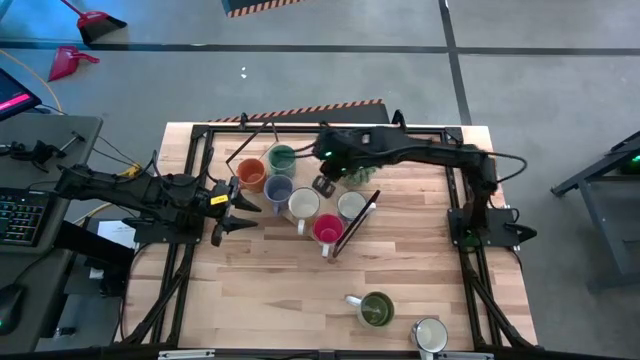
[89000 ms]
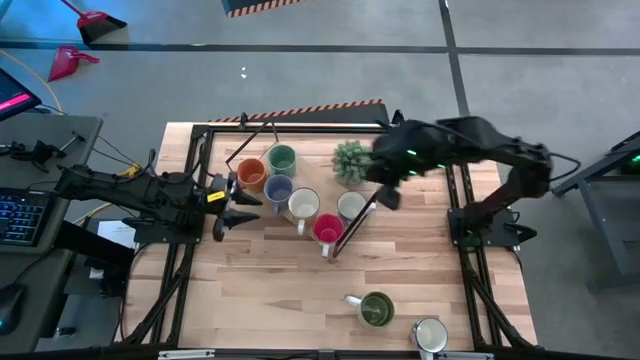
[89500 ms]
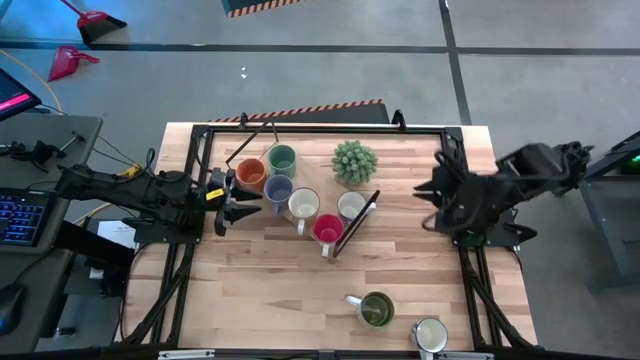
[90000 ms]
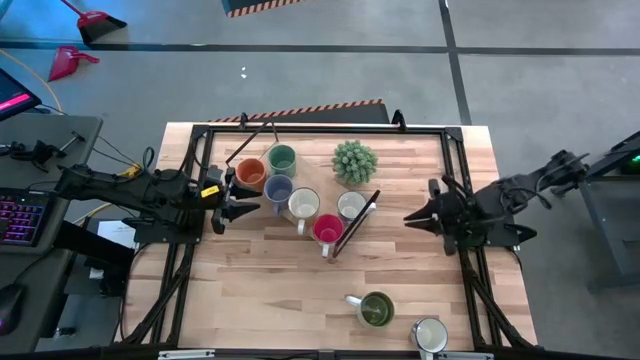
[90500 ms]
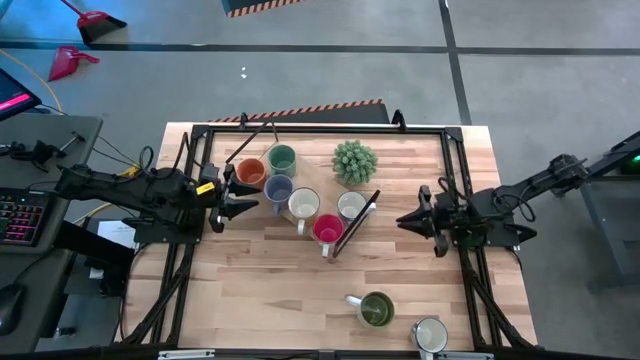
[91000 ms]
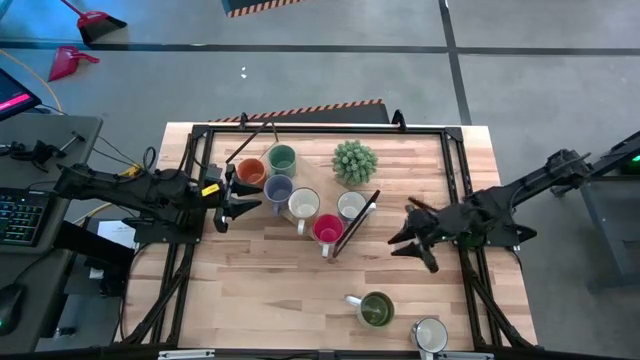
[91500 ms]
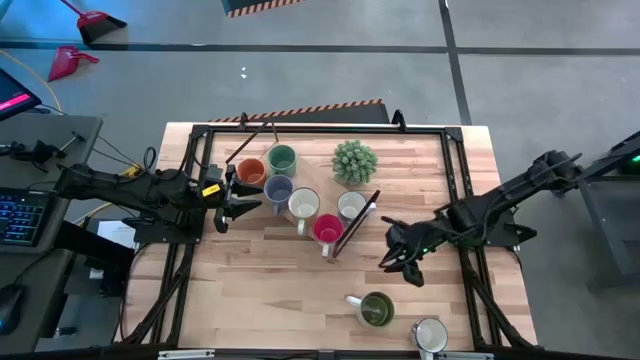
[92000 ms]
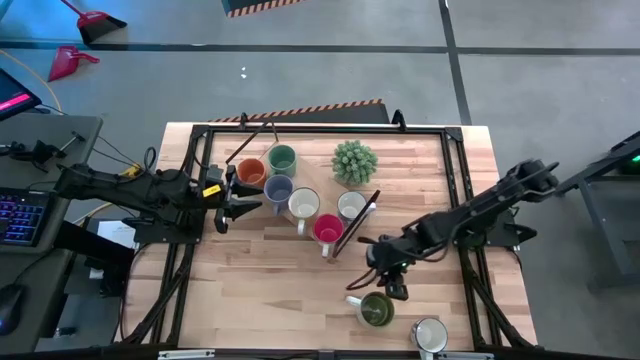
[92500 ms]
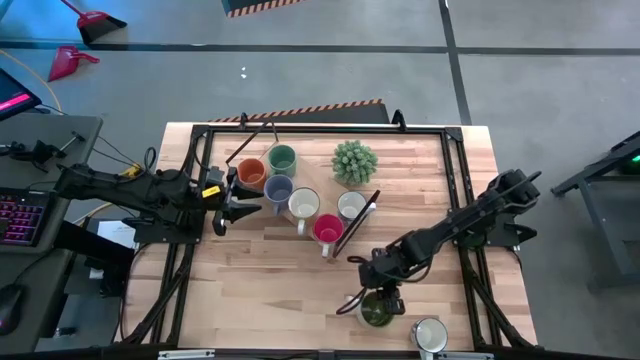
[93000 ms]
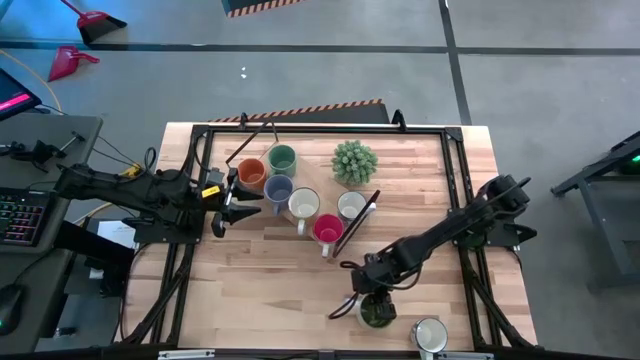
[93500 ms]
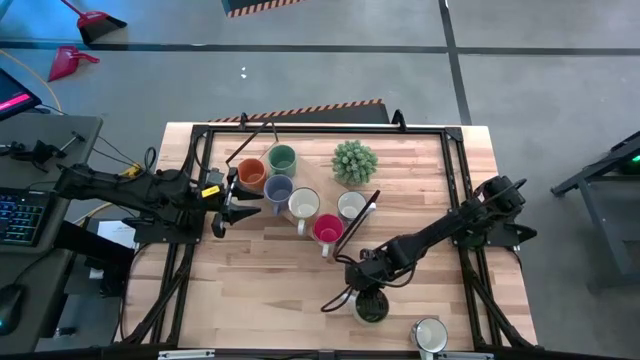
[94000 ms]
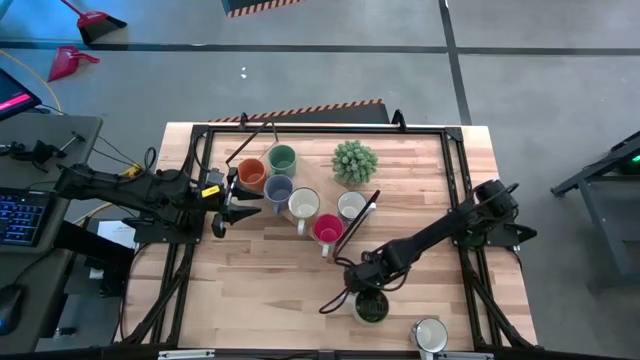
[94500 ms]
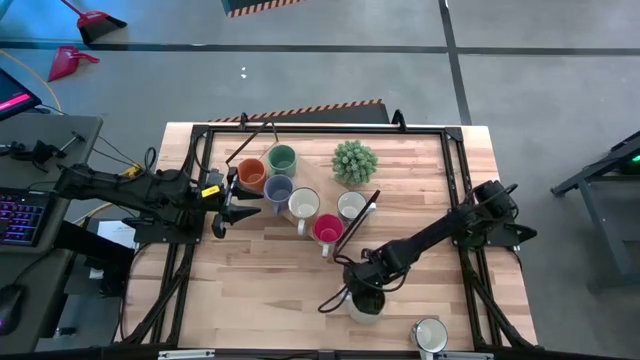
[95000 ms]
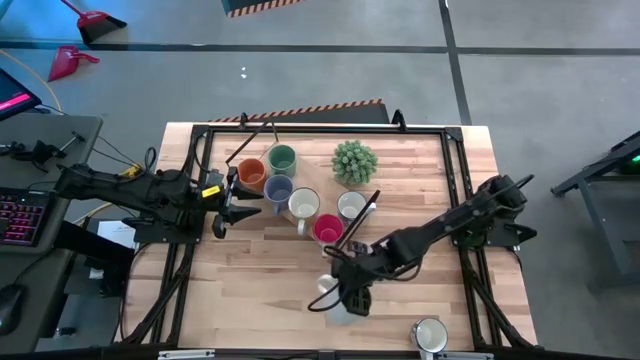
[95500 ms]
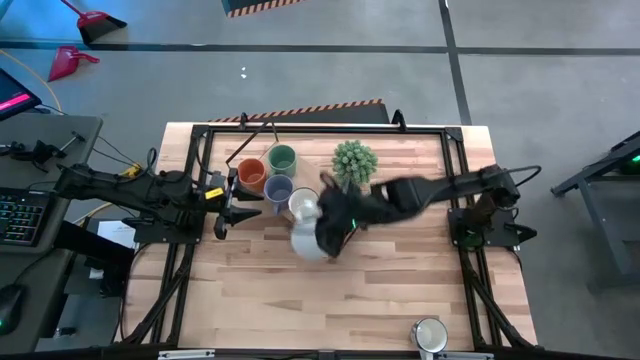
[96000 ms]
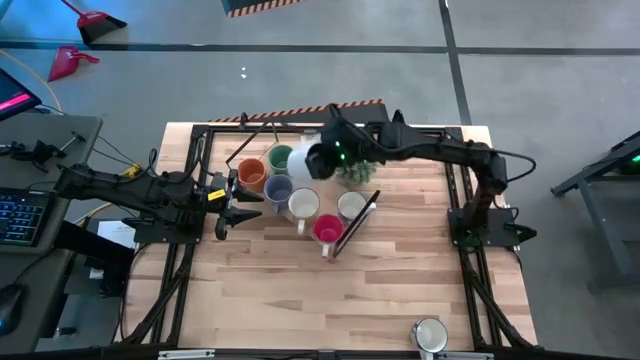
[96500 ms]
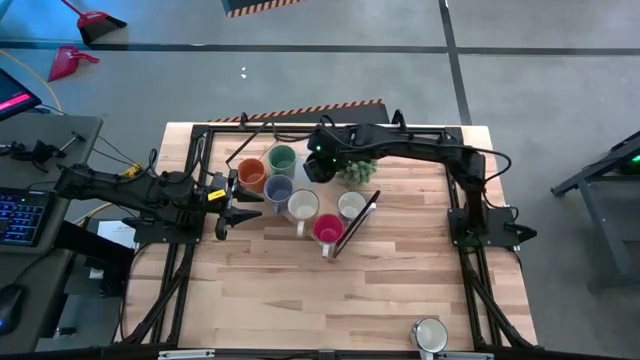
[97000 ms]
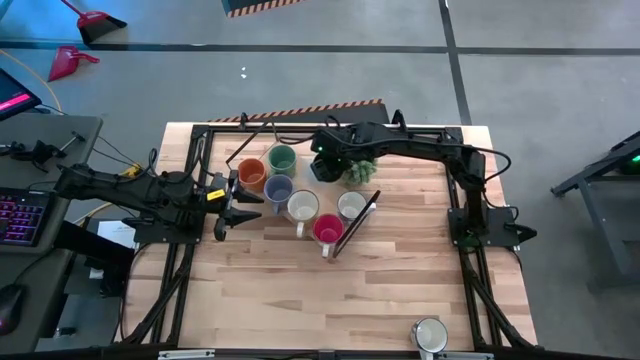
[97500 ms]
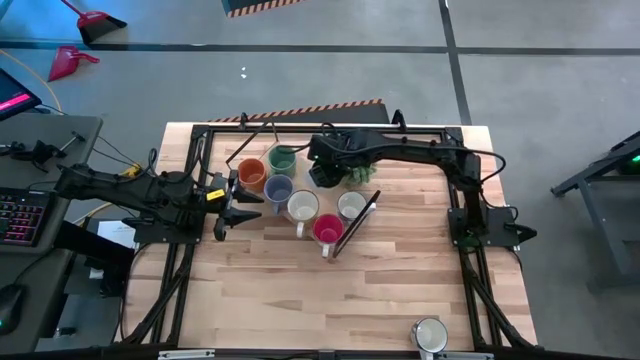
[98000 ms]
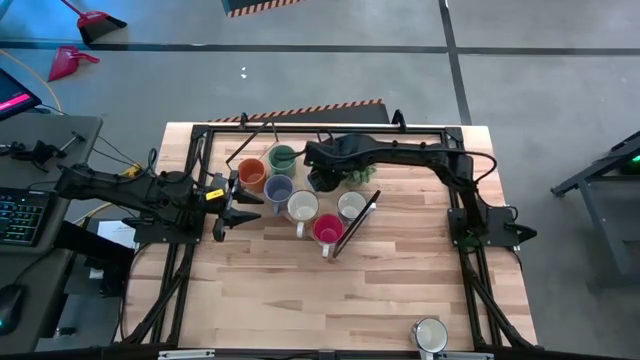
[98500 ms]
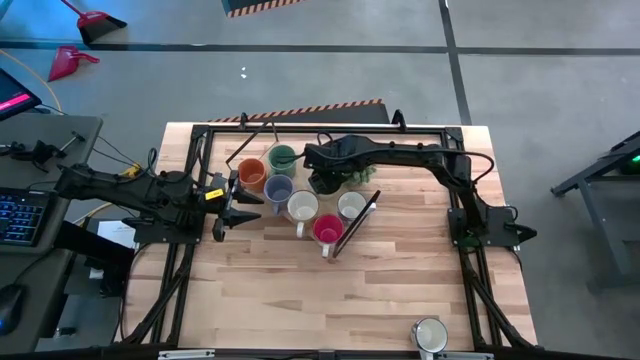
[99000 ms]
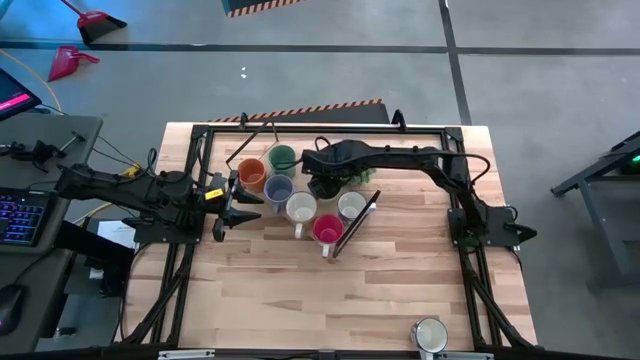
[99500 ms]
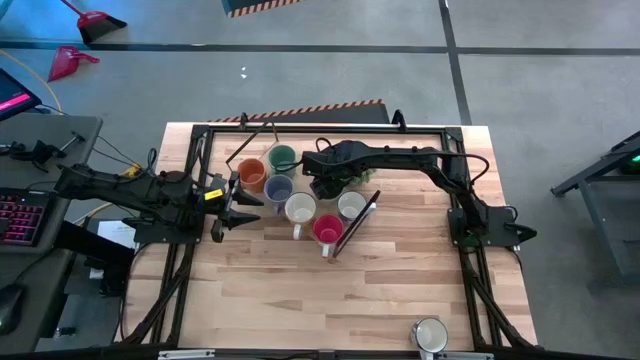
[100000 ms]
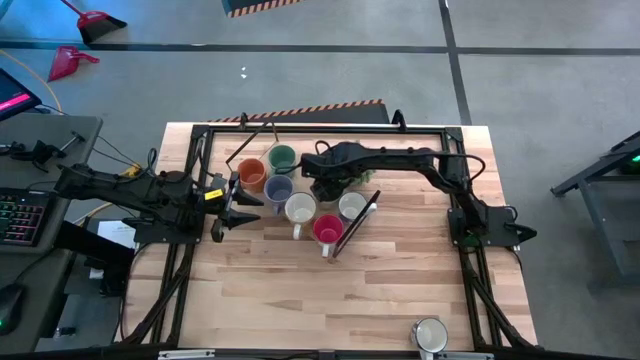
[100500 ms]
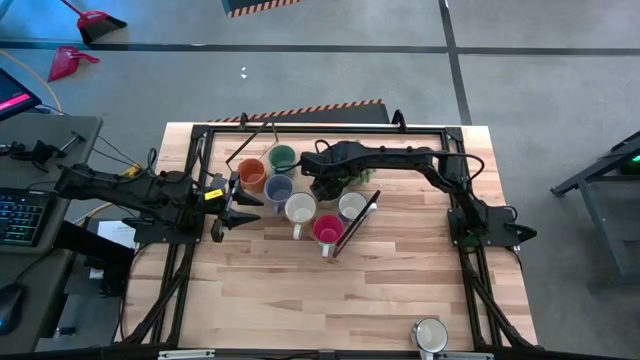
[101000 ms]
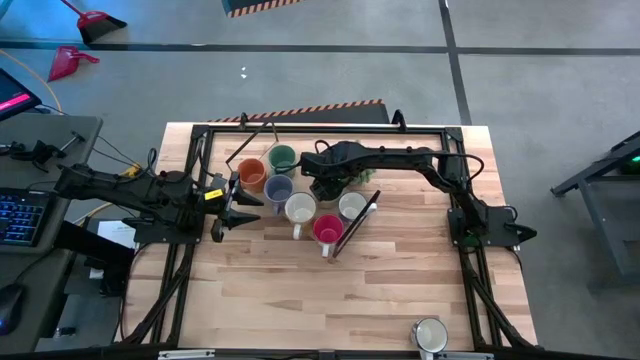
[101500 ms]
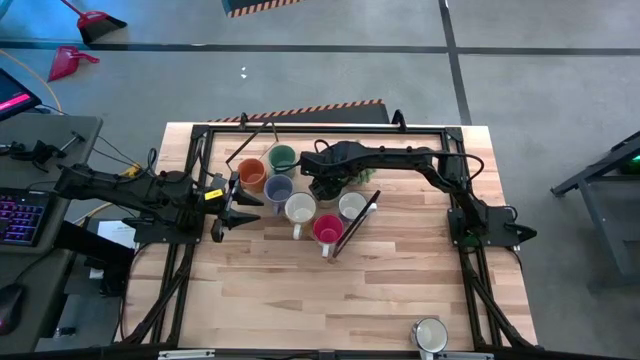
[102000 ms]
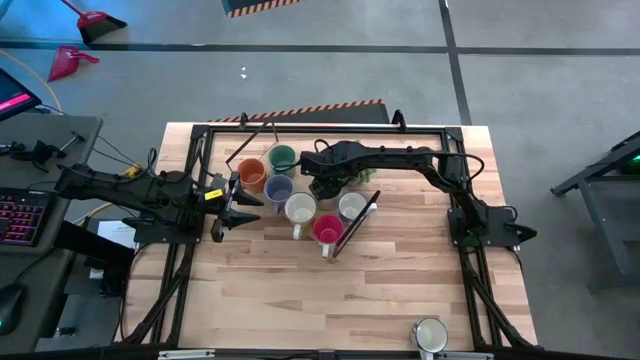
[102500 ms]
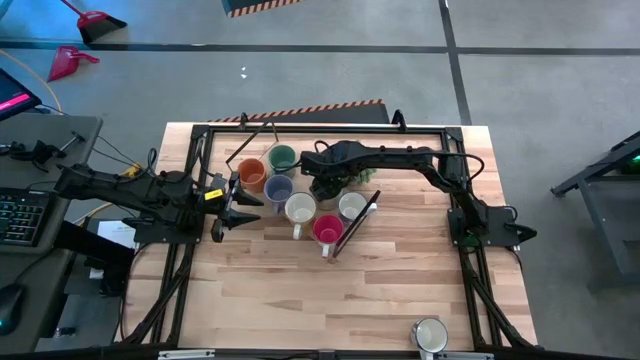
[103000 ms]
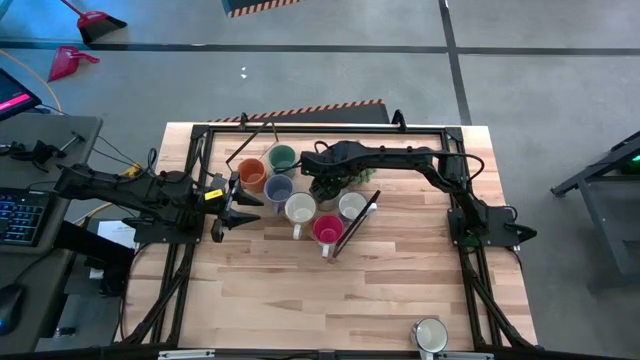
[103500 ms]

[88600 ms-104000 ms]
Task: Place coffee mugs
Put the green mug on the shelf

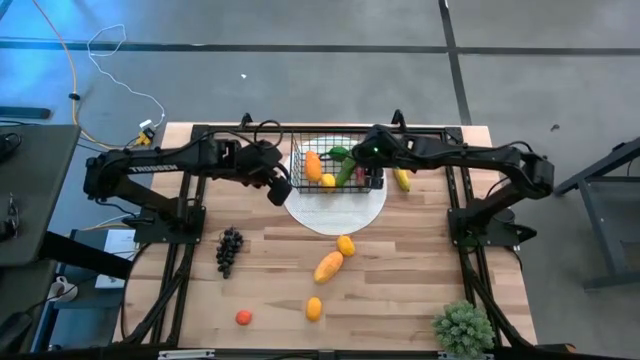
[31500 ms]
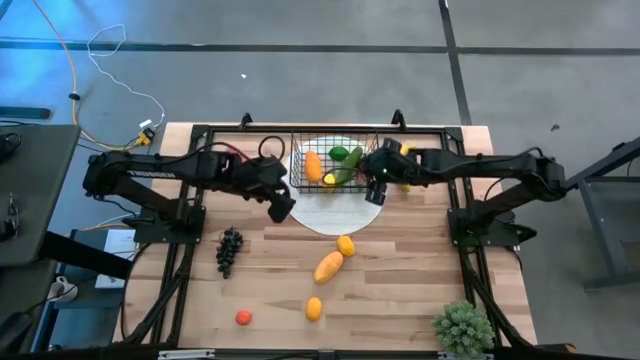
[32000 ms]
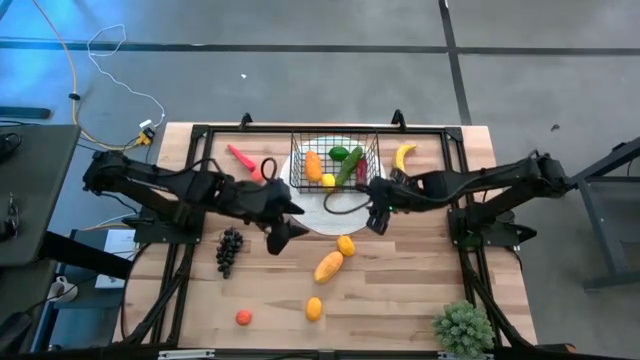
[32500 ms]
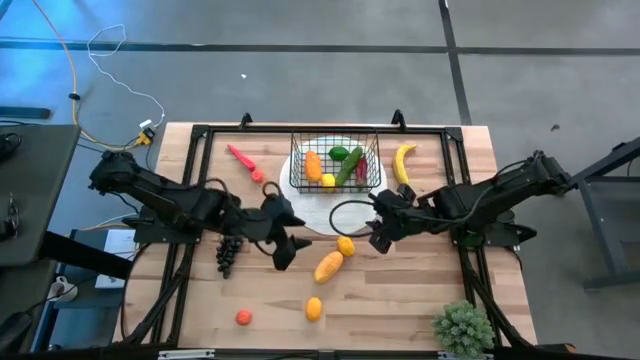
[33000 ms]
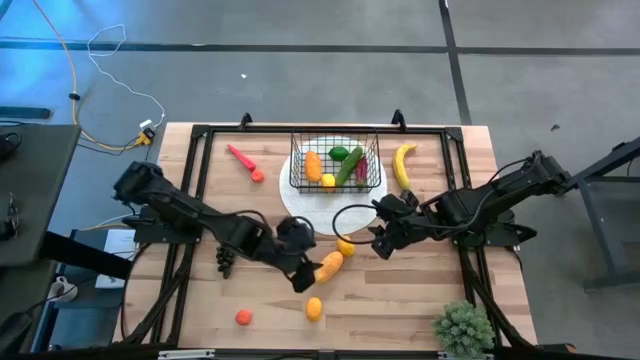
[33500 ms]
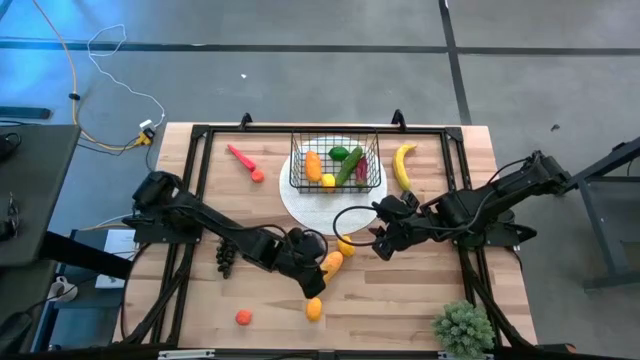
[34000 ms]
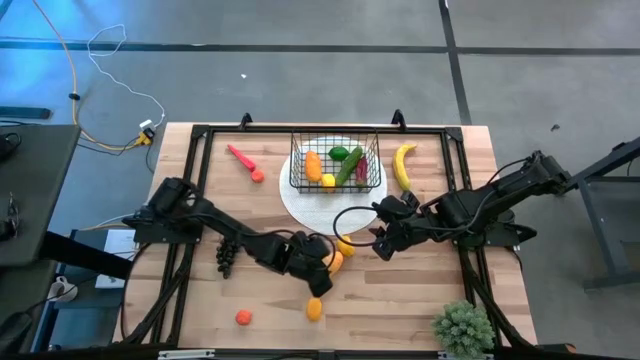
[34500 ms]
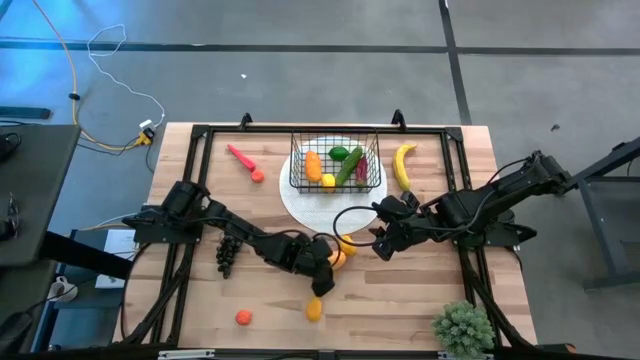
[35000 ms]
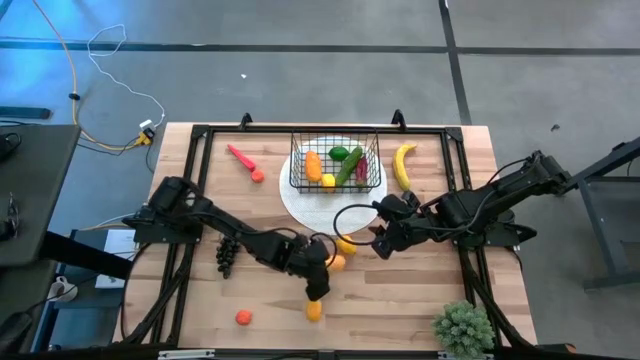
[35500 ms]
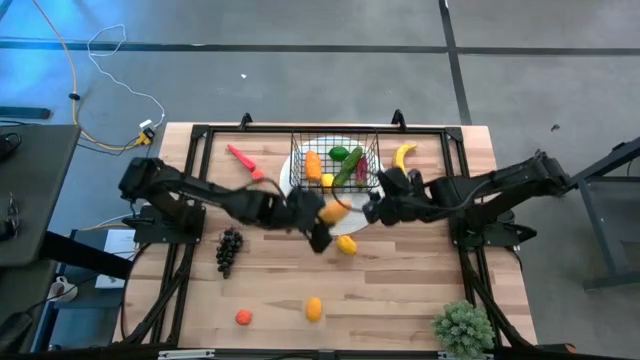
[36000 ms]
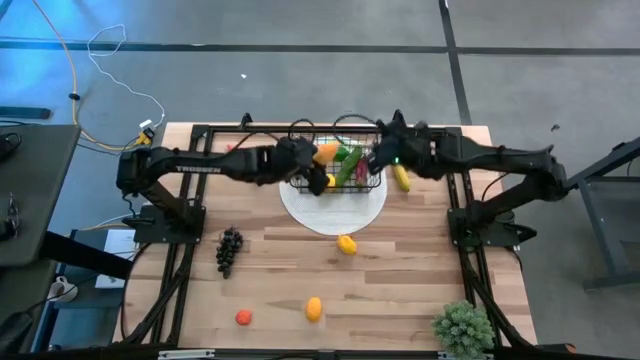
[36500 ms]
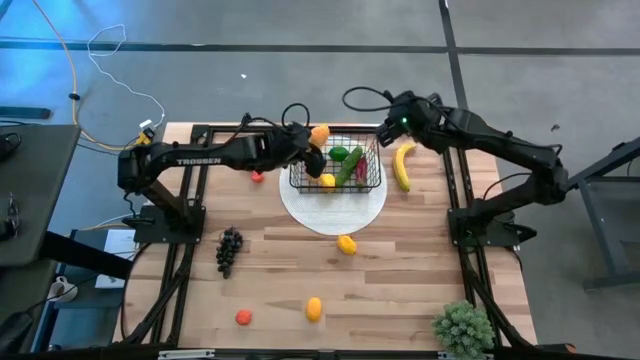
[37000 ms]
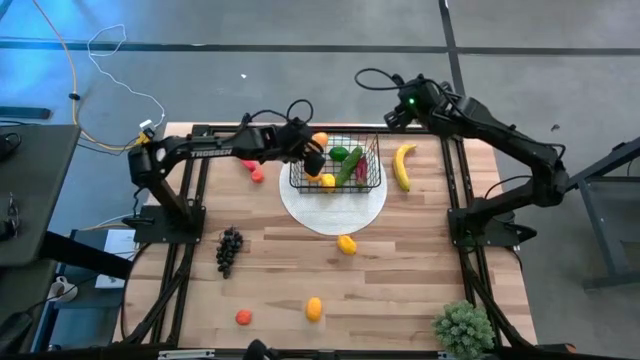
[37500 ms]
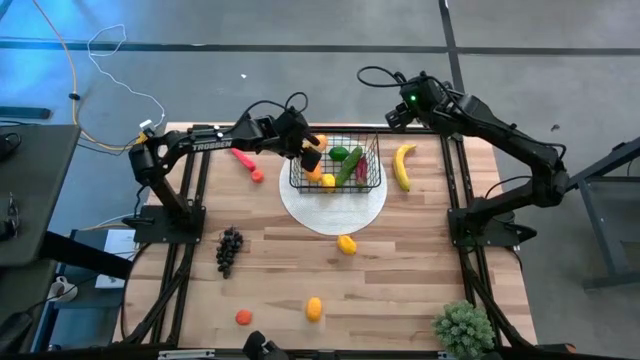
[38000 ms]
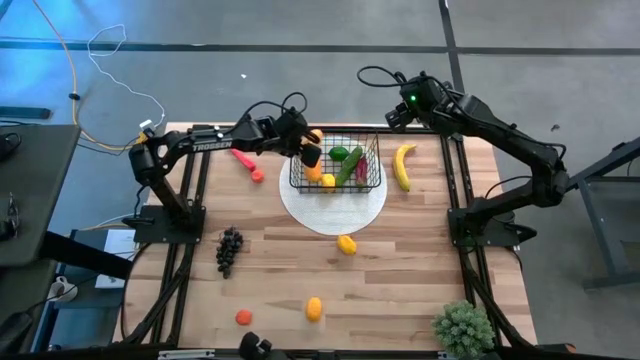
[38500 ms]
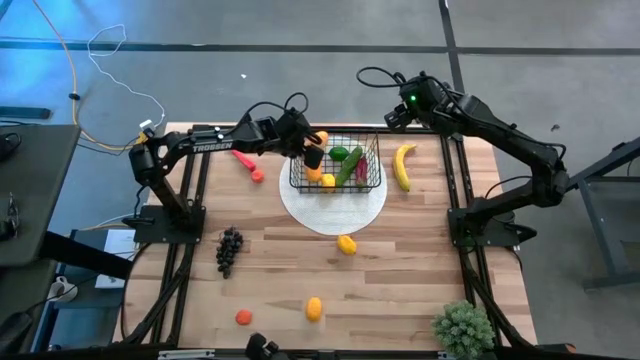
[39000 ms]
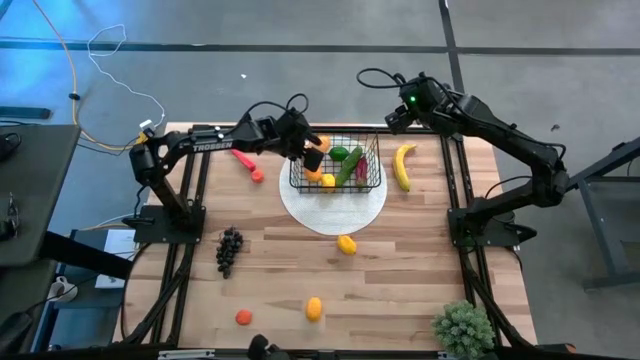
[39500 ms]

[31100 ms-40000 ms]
Task: Build produce basket
Put the yellow mango into the black wire basket
